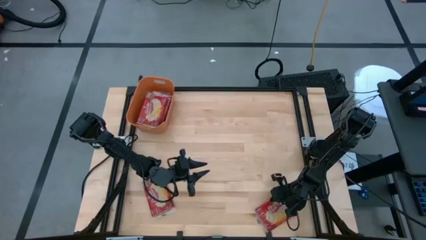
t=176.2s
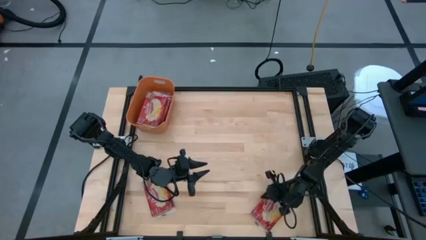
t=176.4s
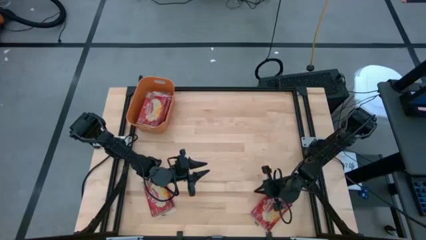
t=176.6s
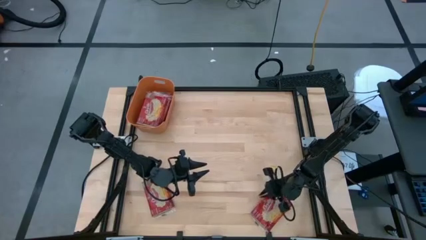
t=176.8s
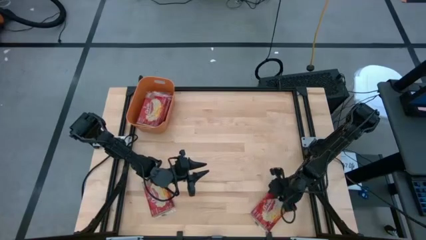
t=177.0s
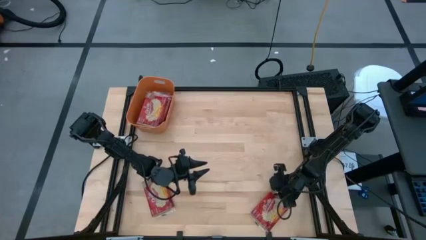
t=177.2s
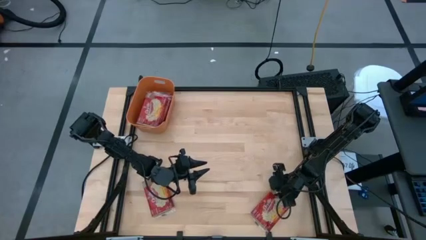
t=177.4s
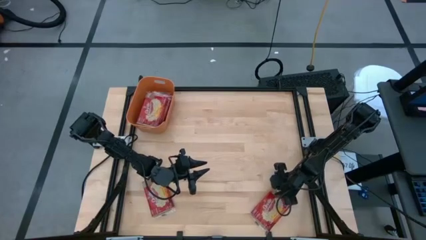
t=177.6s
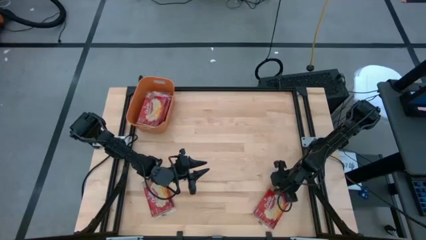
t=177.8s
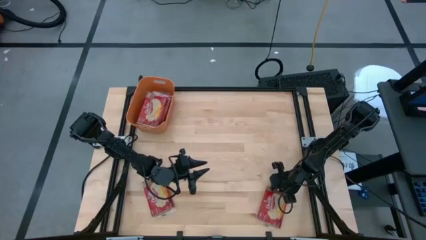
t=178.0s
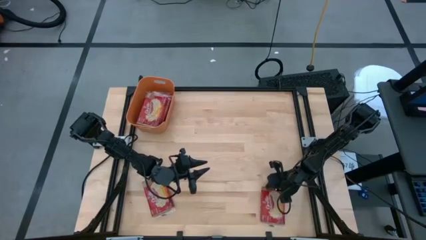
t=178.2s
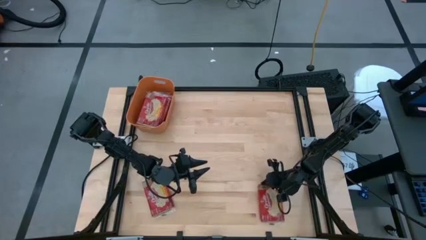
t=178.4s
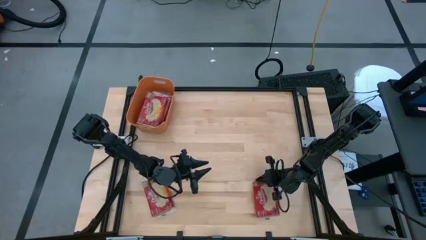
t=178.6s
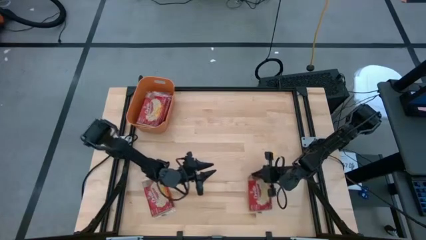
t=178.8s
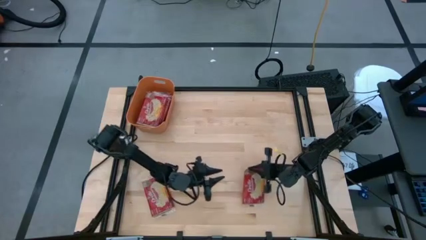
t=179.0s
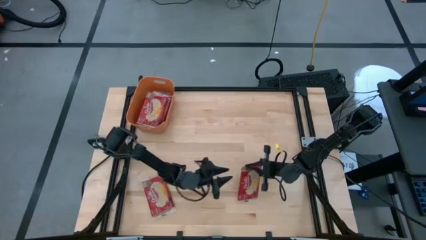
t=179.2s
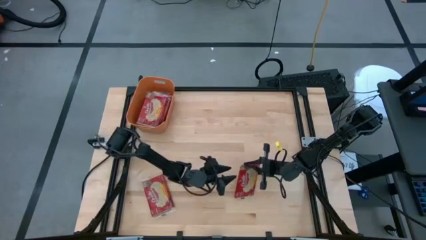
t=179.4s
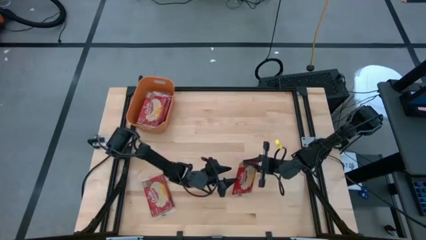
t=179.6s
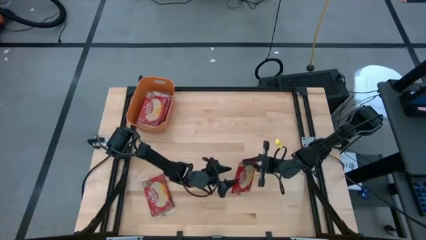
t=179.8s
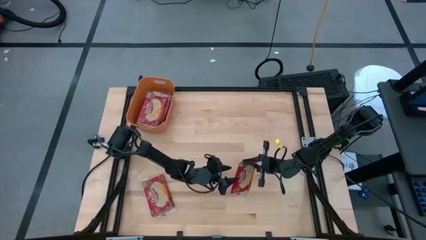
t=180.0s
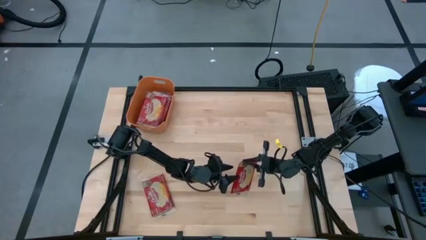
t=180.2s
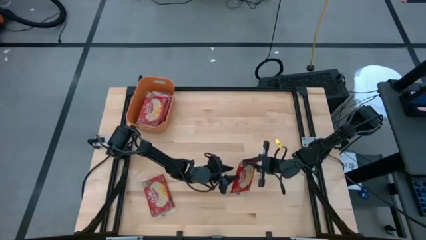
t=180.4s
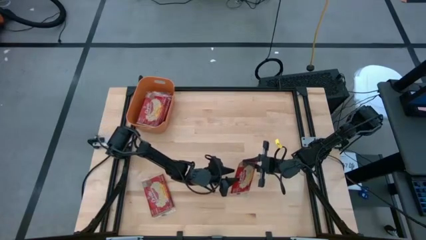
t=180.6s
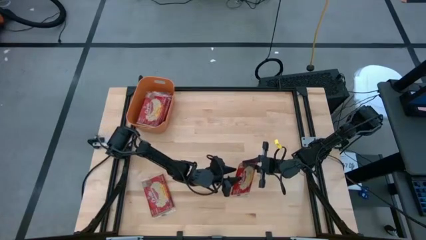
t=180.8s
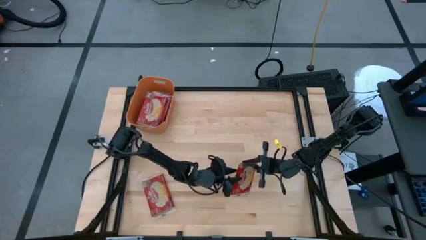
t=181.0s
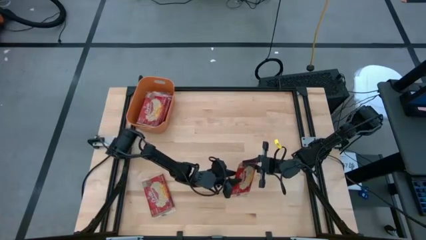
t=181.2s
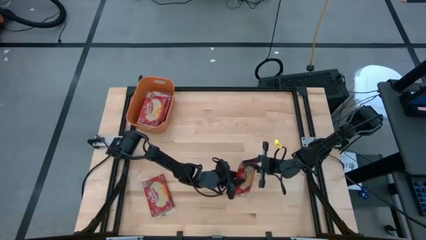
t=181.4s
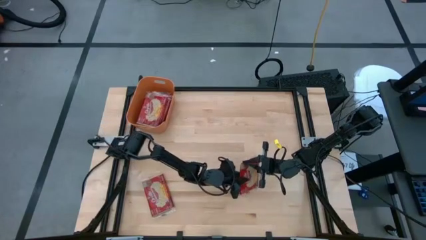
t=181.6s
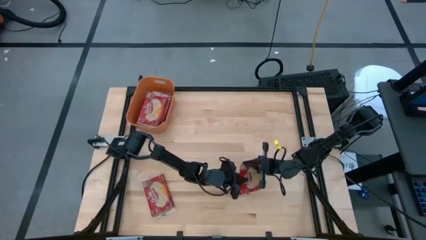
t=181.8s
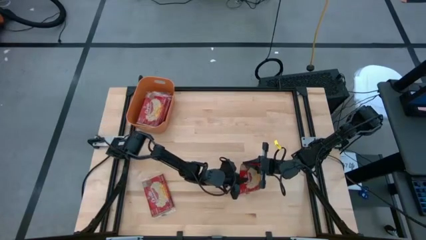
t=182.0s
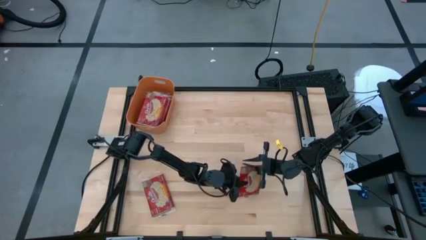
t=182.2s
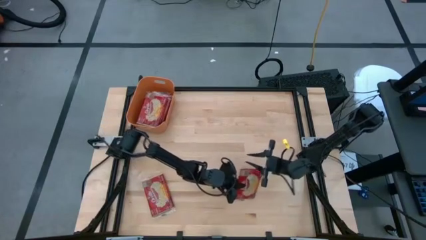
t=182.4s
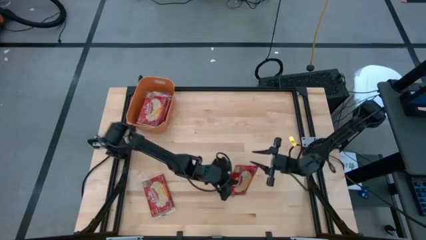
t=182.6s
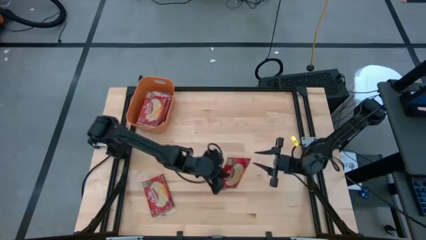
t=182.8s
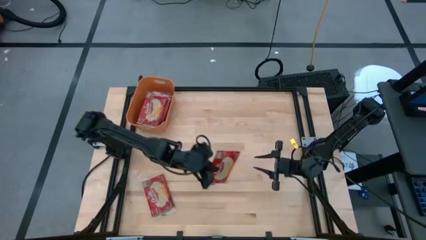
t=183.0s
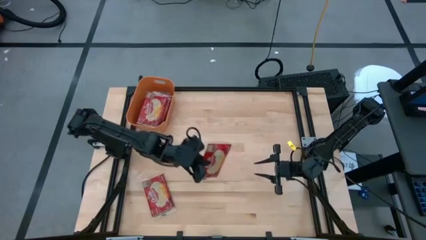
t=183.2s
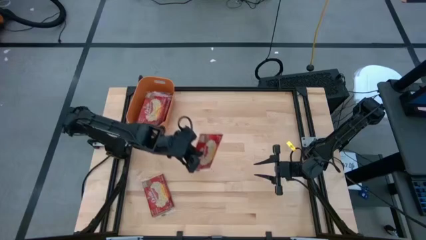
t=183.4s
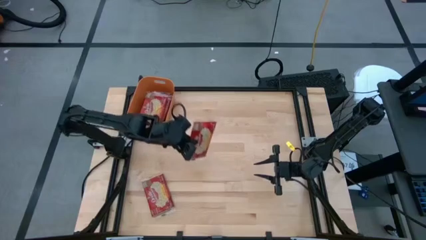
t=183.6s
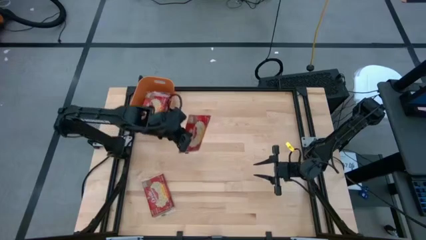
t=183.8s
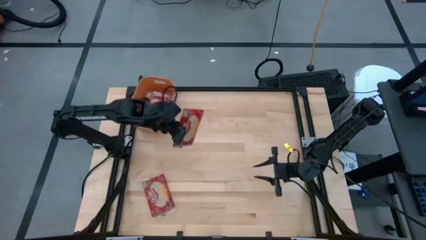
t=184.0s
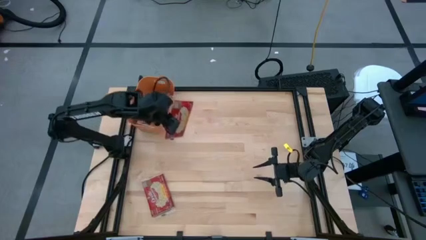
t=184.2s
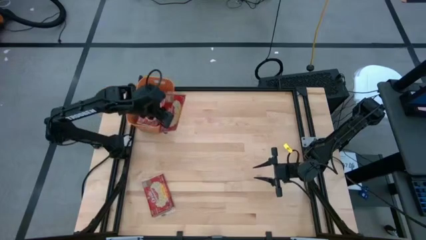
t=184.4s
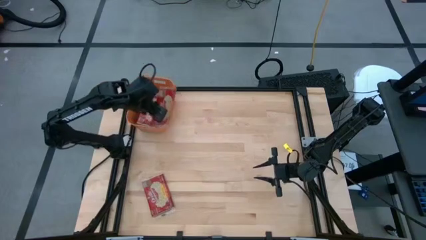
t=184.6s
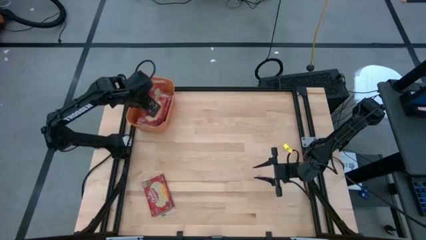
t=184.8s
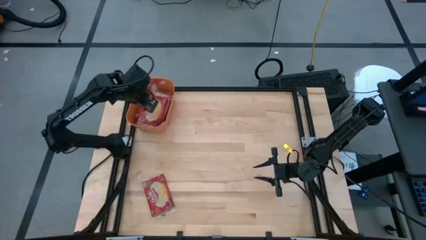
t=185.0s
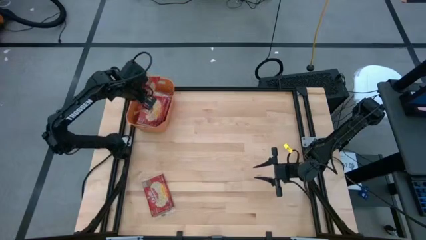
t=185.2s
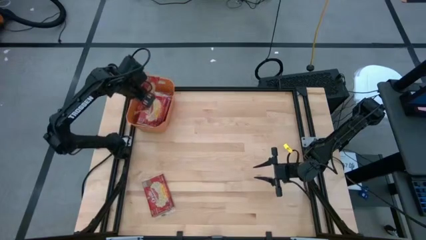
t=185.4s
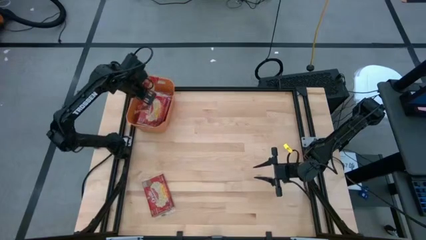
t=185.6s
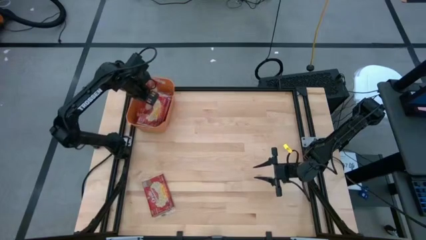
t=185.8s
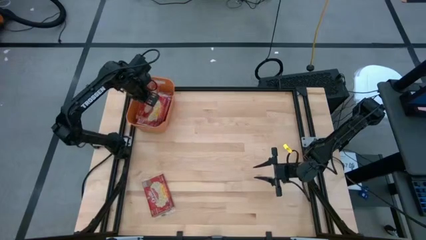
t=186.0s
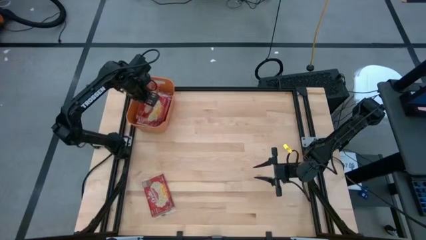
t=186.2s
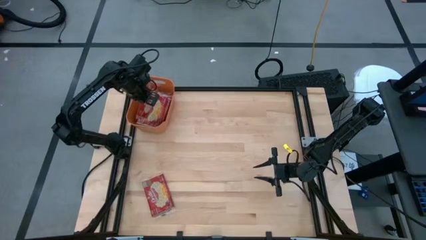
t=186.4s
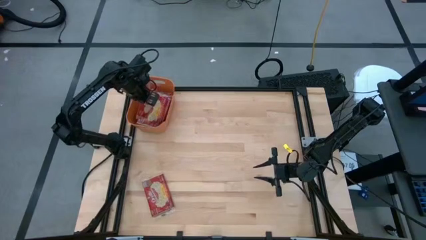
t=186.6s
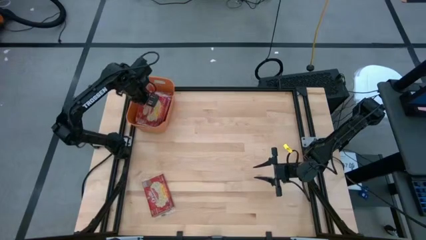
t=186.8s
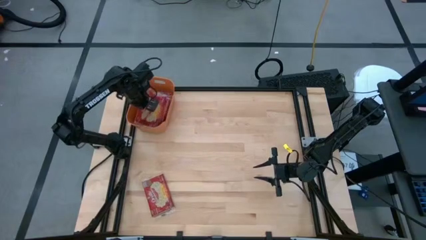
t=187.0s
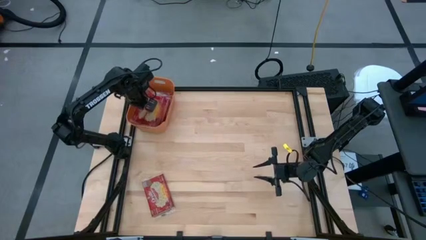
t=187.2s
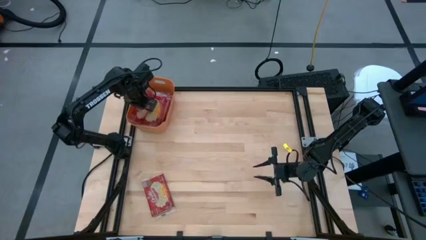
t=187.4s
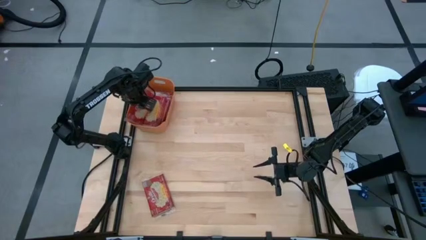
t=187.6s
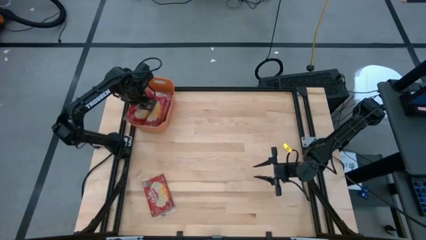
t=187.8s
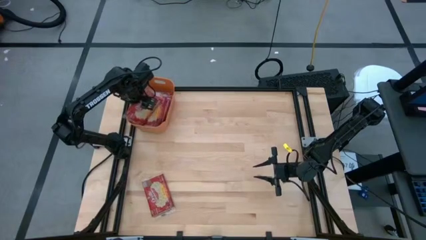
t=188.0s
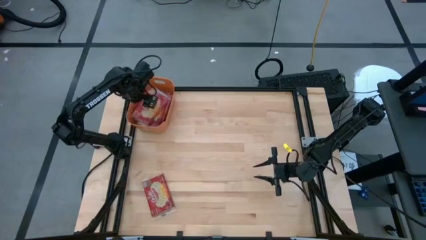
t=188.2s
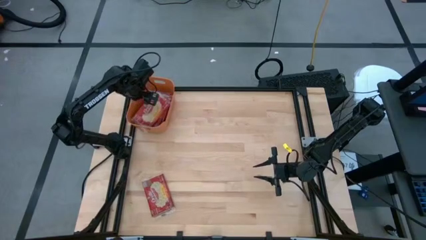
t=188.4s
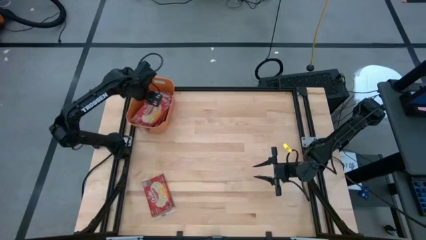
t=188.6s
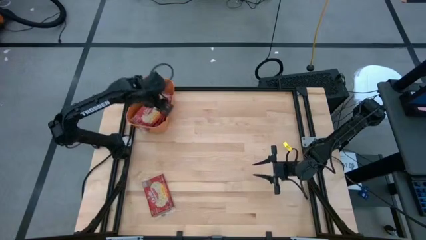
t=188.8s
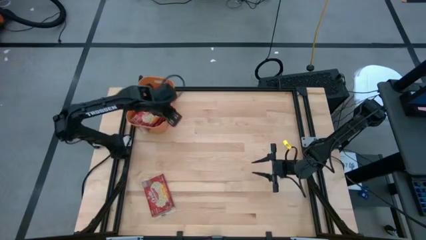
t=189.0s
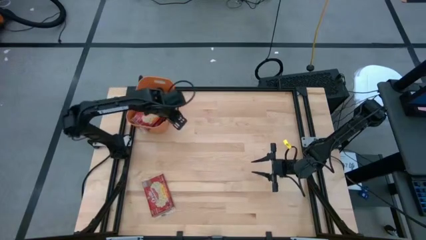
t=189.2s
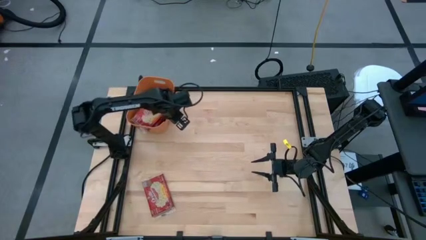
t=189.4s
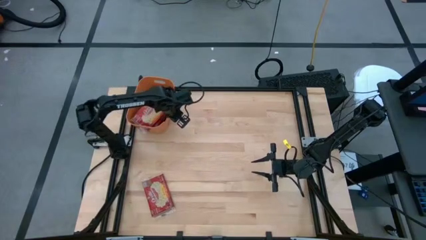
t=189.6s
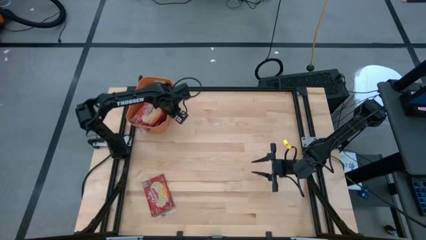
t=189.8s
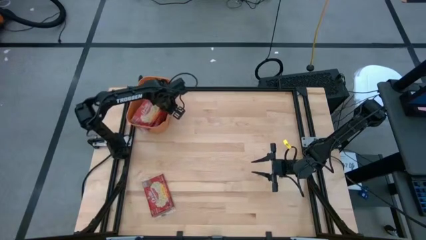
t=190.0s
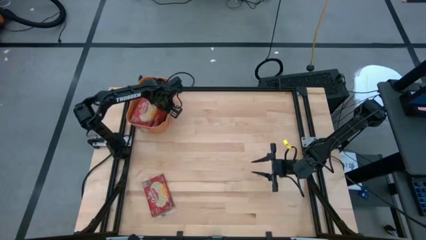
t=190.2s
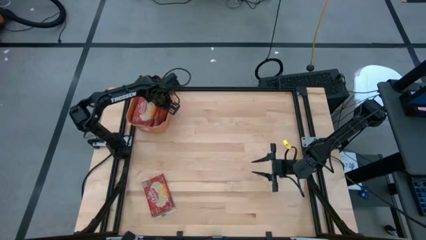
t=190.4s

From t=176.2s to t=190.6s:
Task: Sort popcorn bags into baskets
Put the red popcorn bag into the orange bin

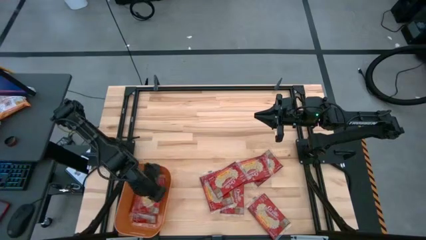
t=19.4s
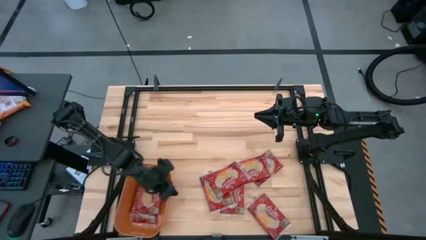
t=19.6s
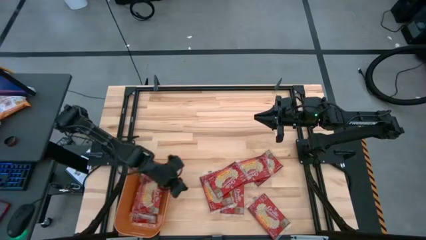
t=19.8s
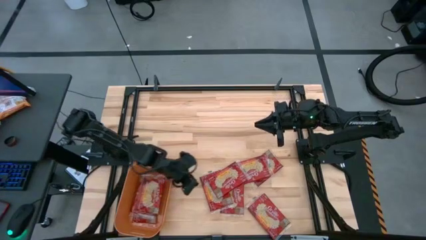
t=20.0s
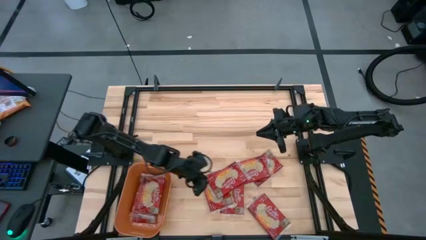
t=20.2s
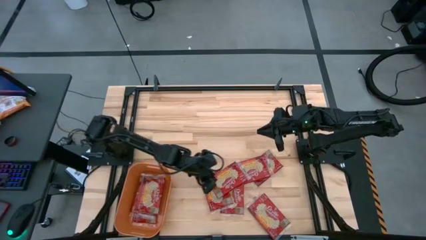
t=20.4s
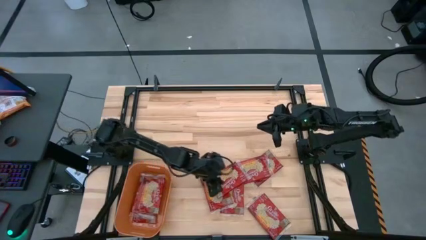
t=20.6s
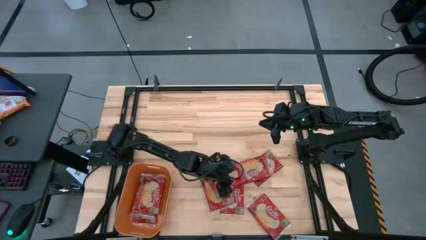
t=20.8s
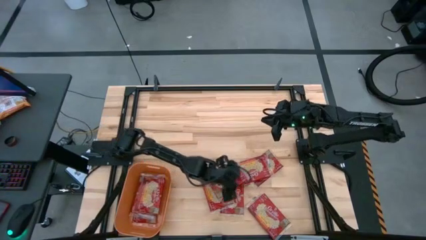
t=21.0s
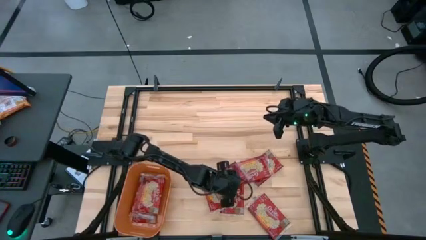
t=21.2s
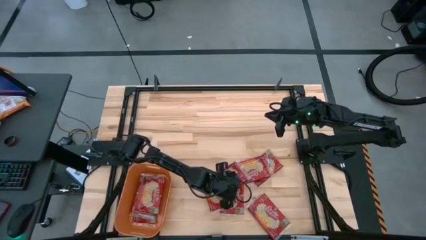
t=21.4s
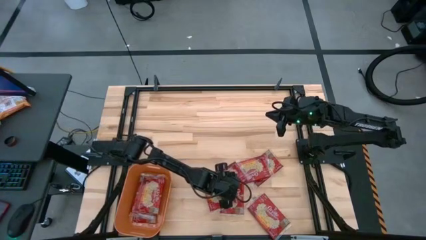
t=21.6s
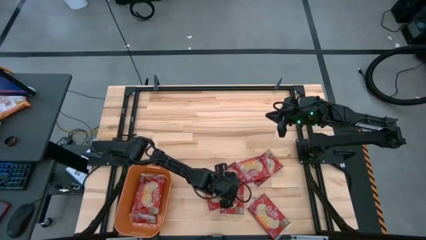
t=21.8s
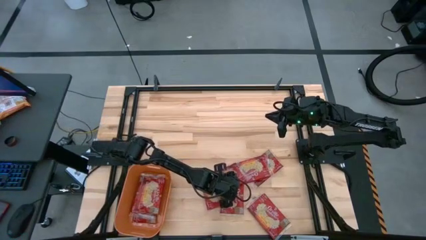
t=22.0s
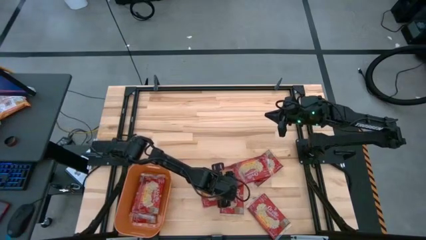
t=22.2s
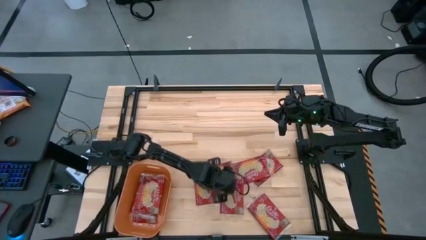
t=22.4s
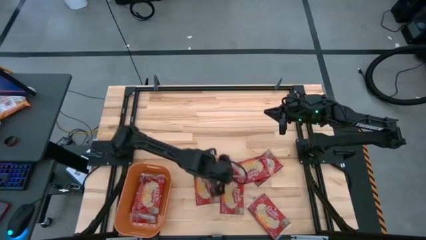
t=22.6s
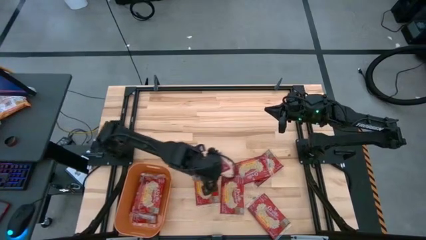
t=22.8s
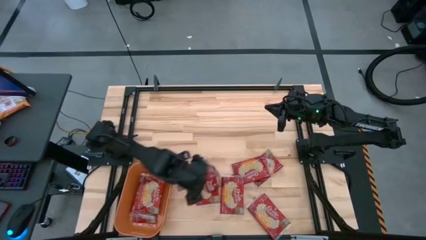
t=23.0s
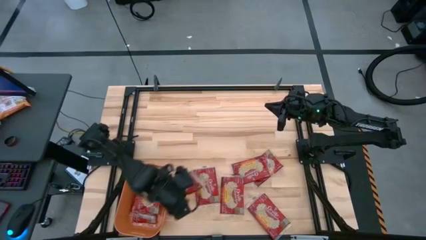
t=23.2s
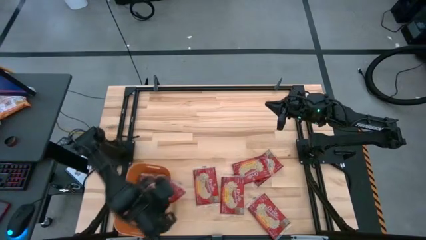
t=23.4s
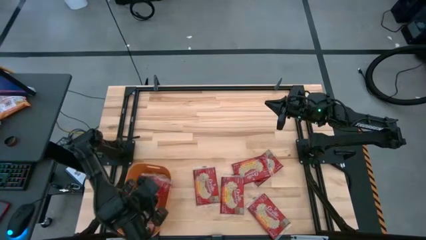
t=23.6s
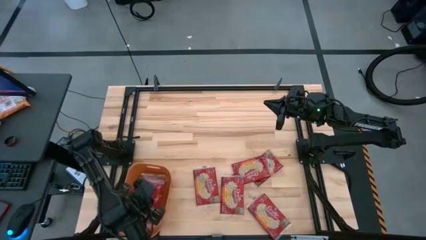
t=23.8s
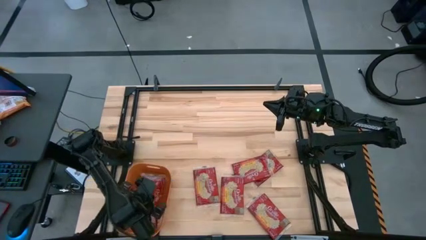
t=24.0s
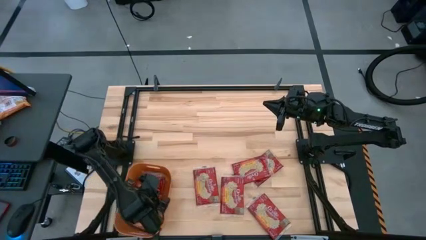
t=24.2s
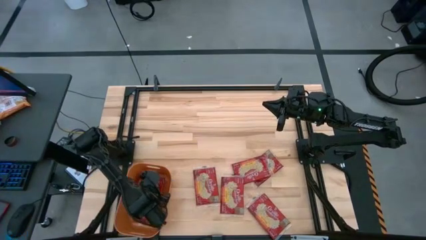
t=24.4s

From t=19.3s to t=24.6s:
Task: Sort popcorn bags into baskets
Put the red popcorn bag into the orange container
